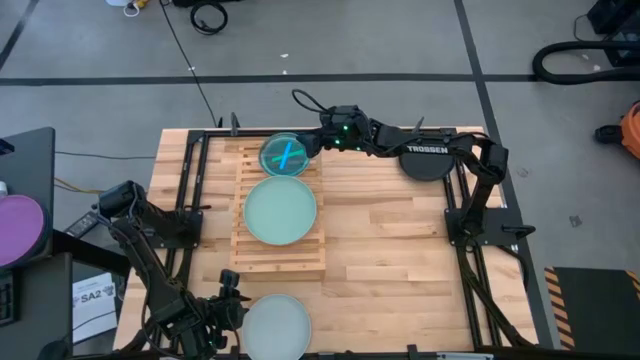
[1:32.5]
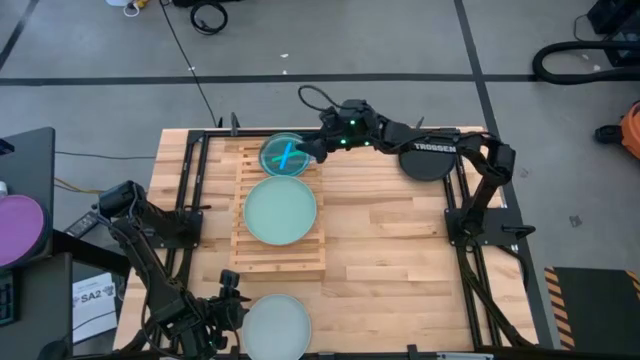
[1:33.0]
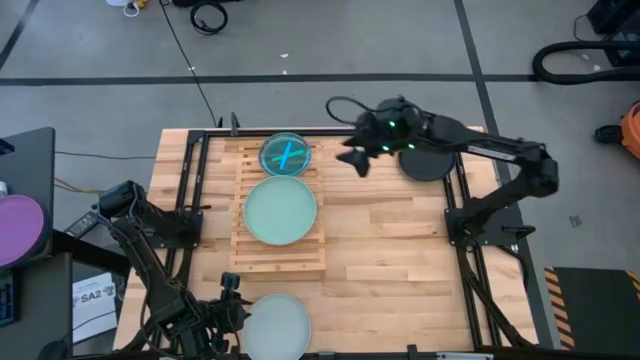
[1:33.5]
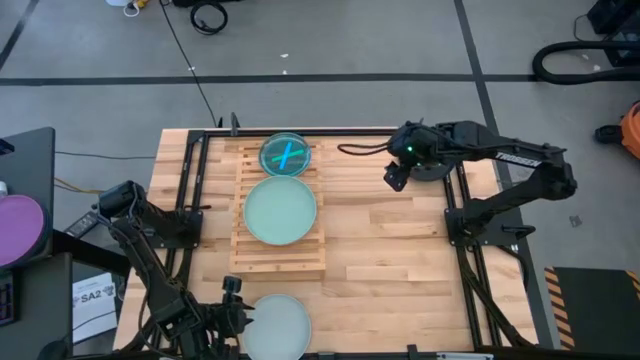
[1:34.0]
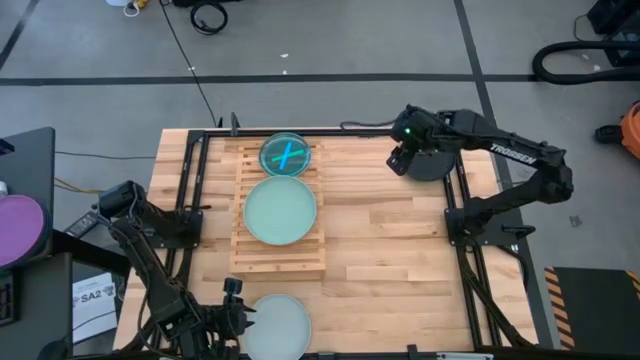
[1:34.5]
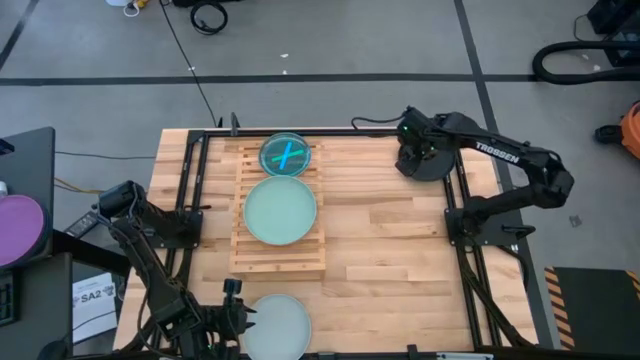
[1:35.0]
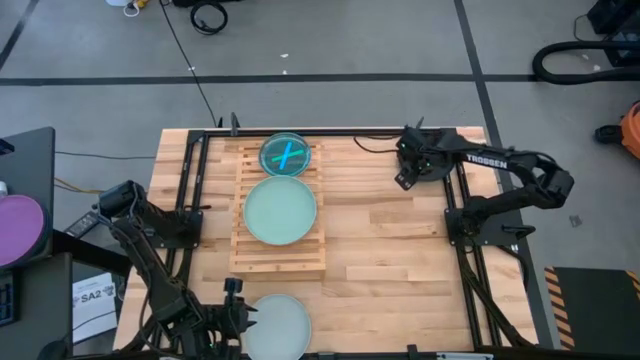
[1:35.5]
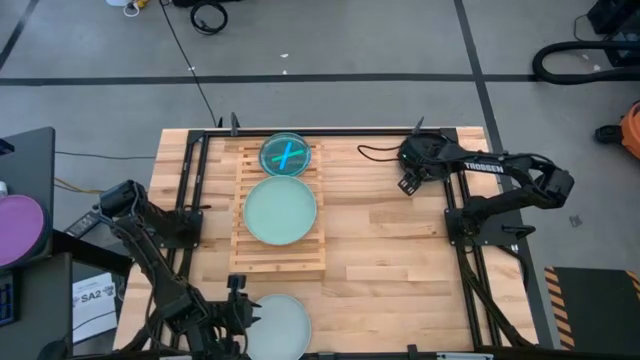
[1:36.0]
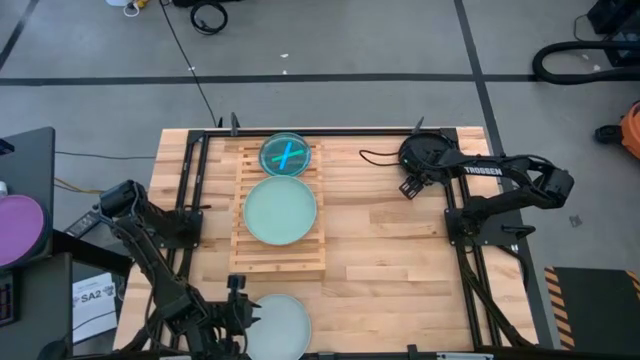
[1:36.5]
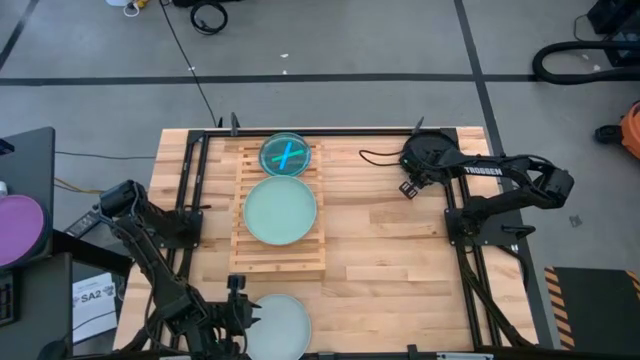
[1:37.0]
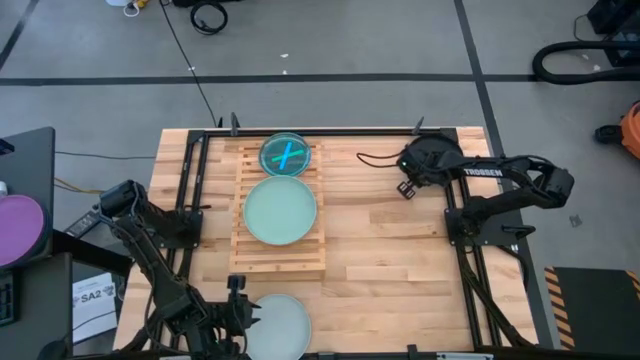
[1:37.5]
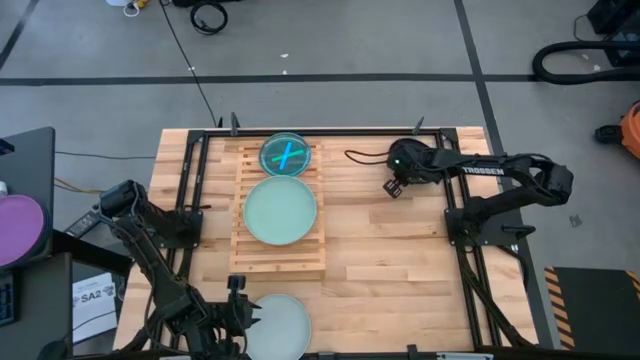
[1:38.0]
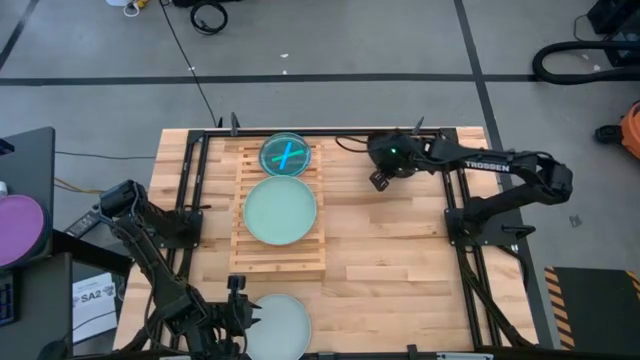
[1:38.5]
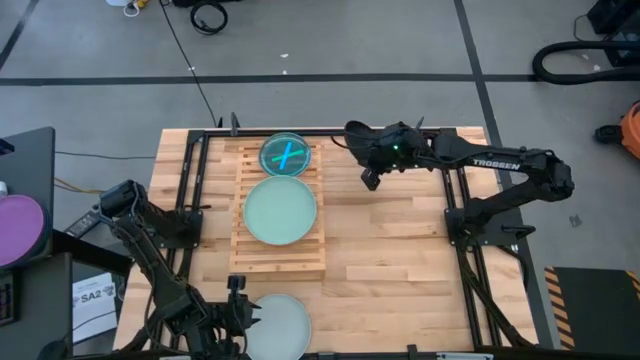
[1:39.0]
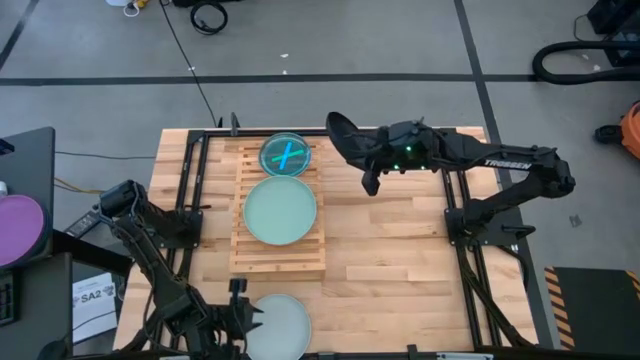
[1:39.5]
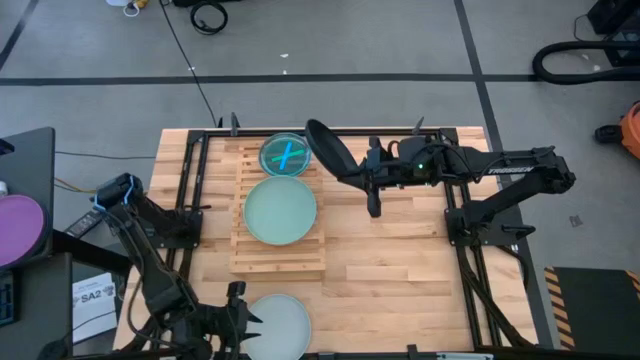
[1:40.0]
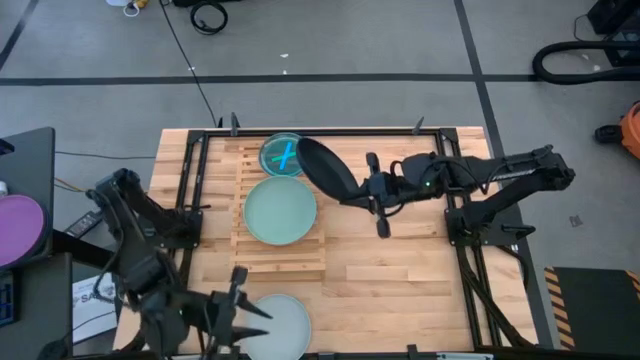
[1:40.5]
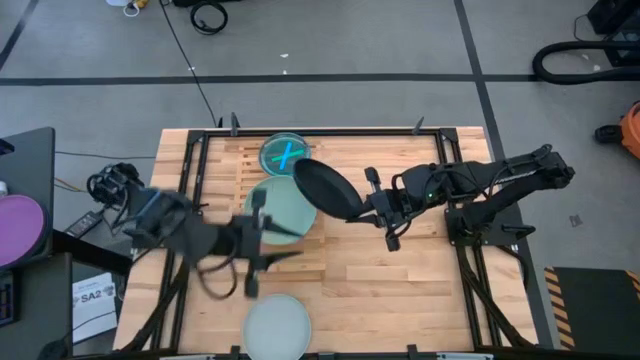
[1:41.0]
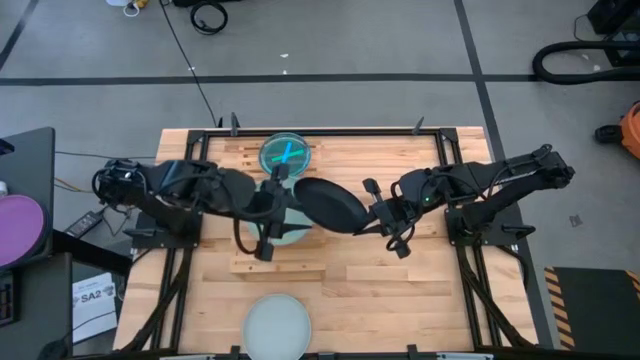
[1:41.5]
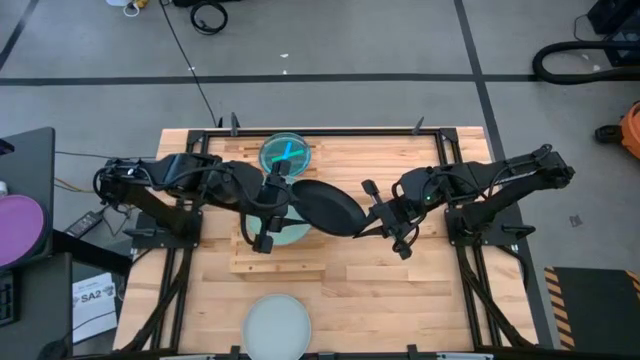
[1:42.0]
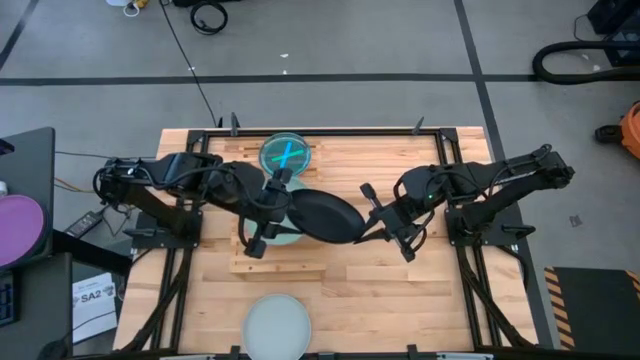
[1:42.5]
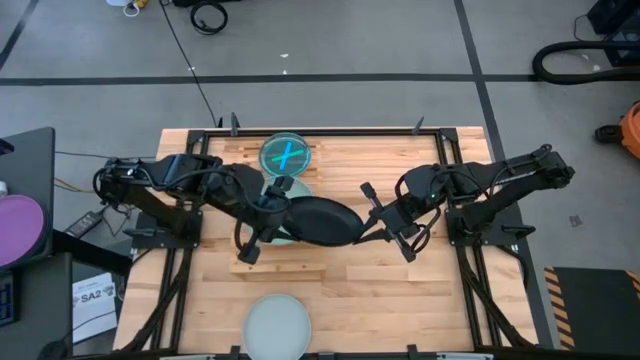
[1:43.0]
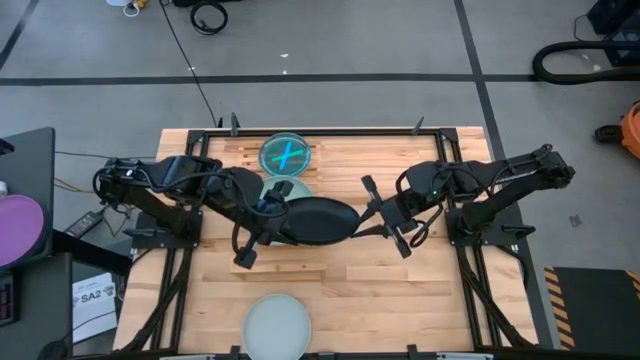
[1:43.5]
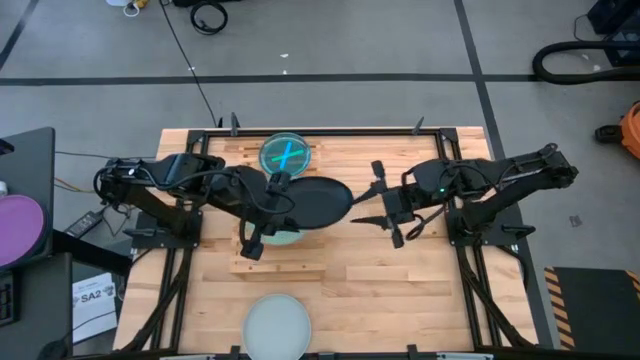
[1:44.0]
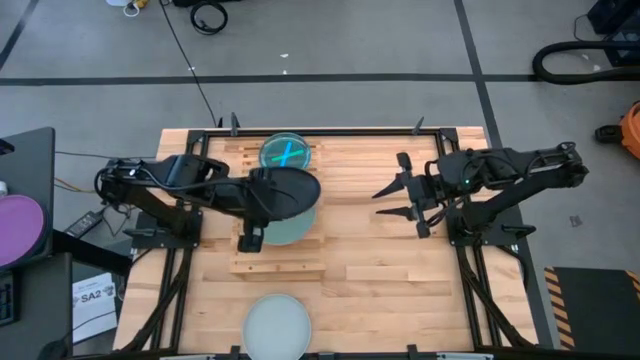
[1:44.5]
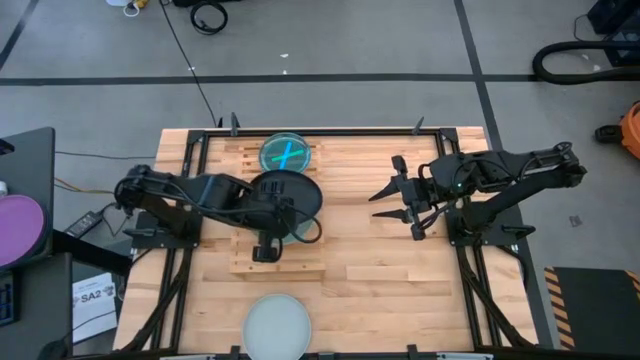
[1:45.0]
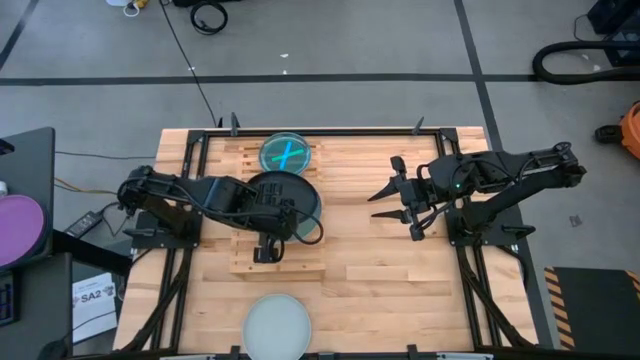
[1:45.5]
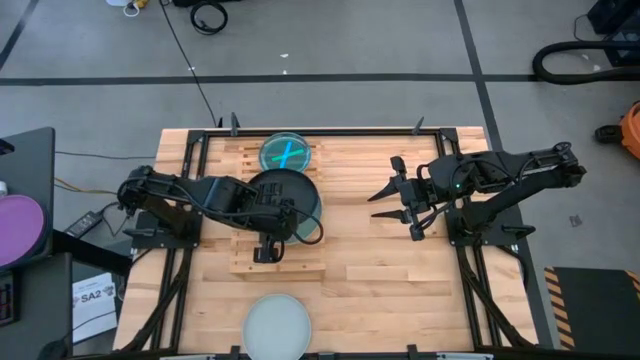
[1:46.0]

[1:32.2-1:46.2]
Task: Place and stack plates onto a shelf
Stack the black plate on the light green plate

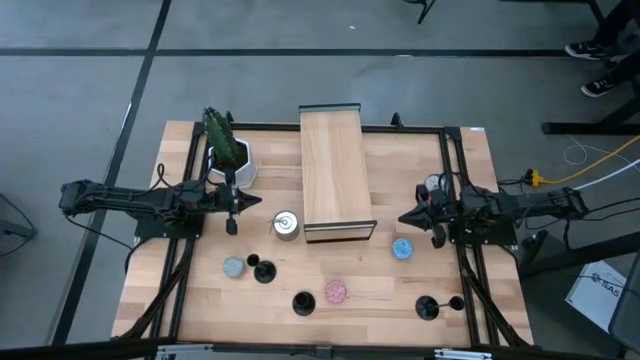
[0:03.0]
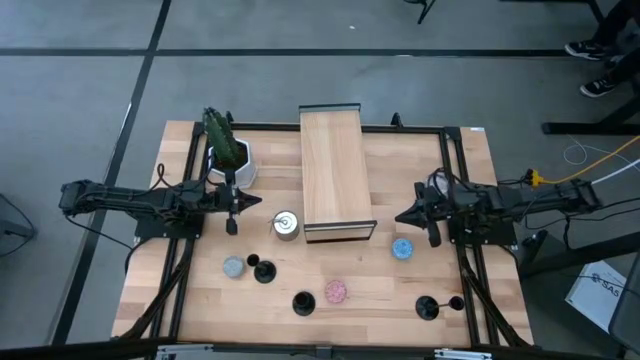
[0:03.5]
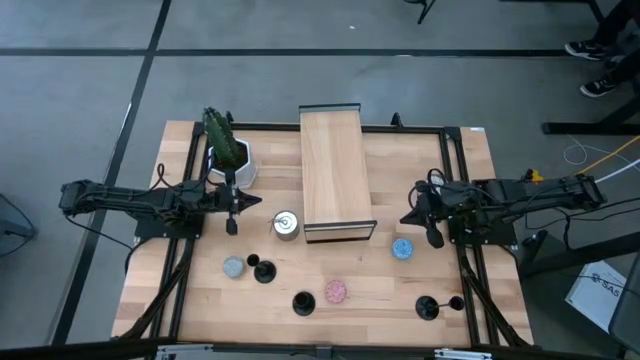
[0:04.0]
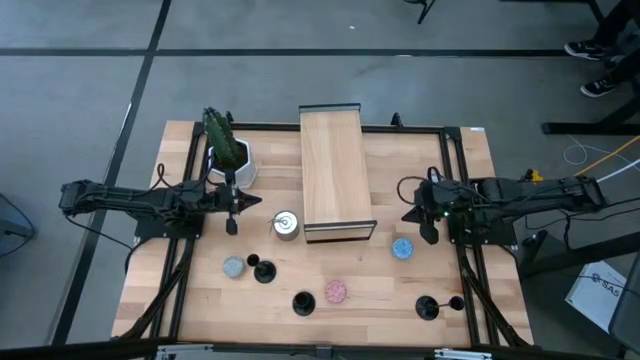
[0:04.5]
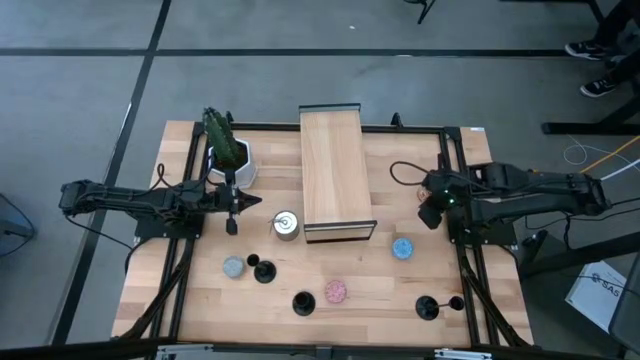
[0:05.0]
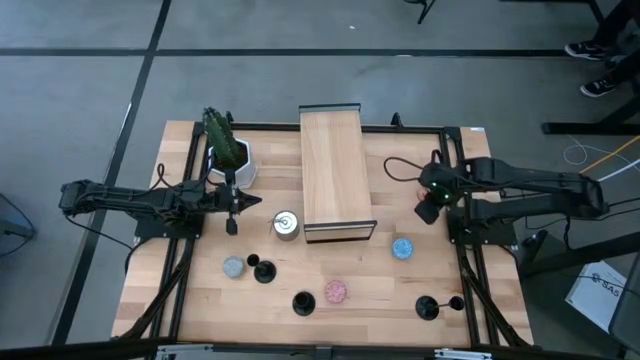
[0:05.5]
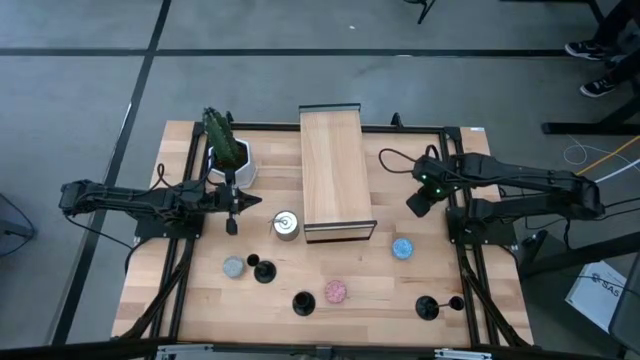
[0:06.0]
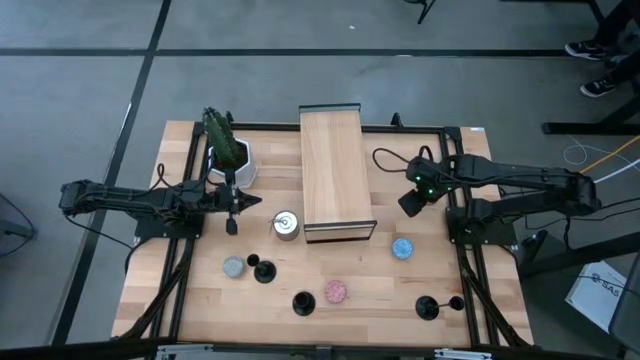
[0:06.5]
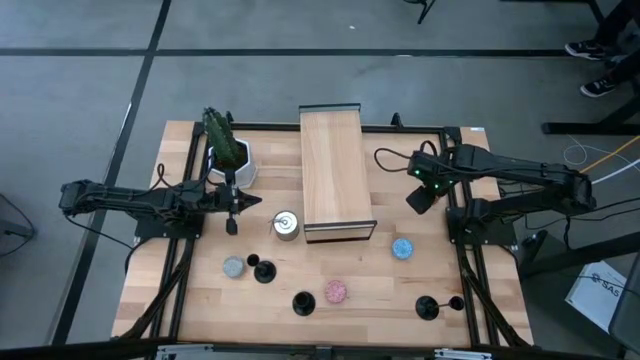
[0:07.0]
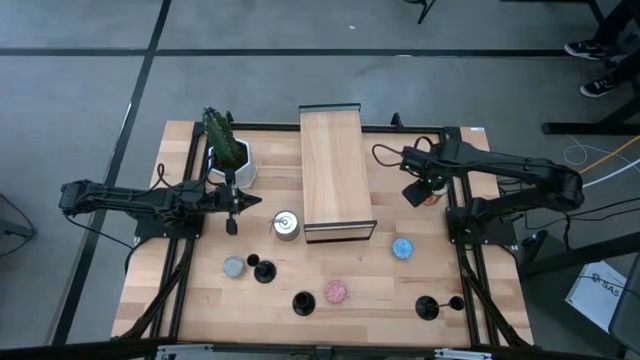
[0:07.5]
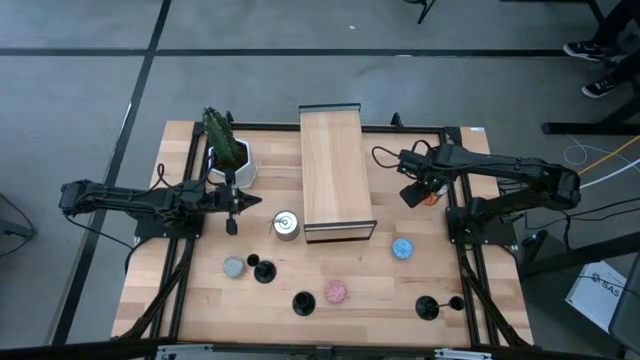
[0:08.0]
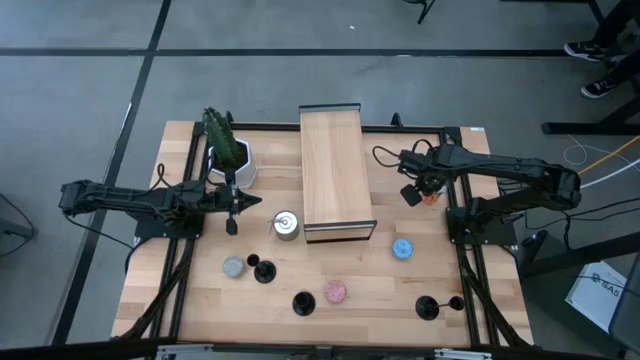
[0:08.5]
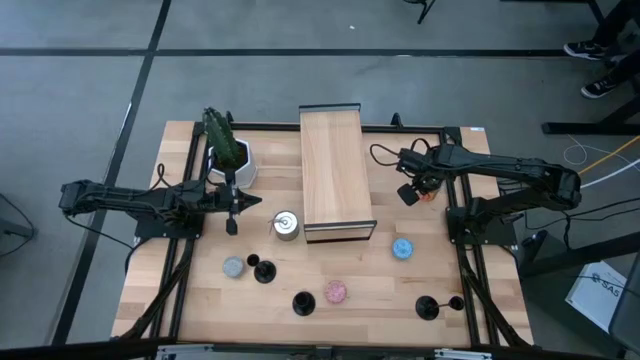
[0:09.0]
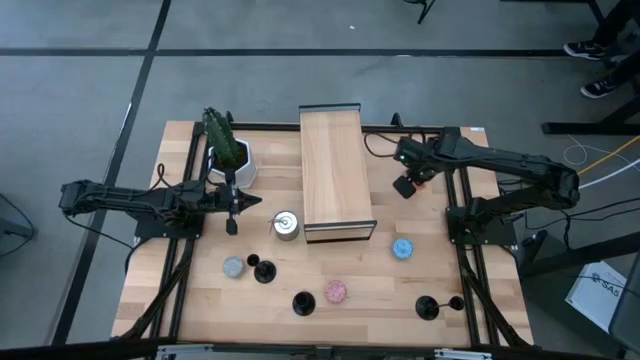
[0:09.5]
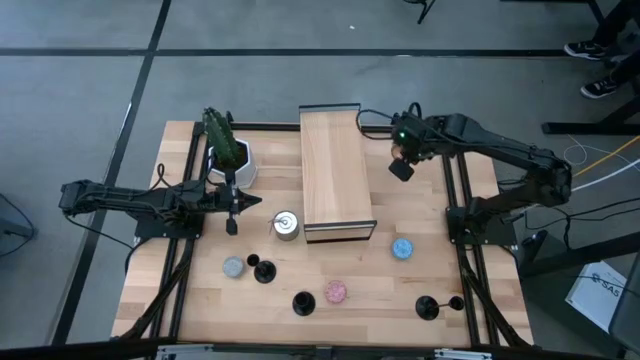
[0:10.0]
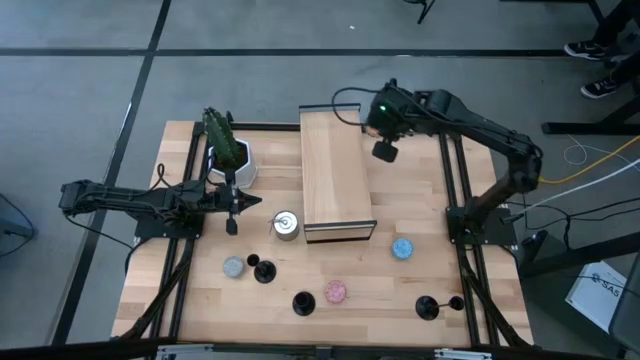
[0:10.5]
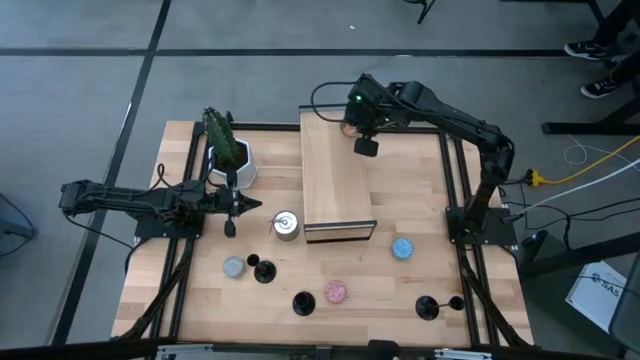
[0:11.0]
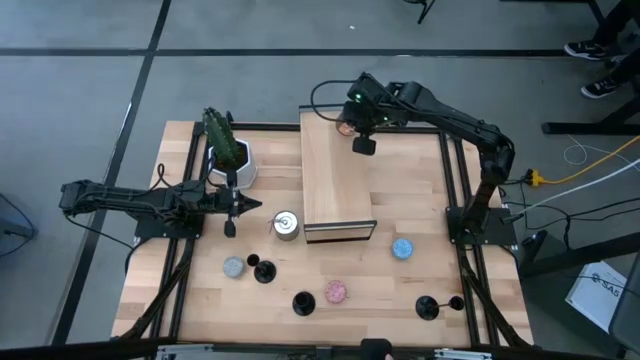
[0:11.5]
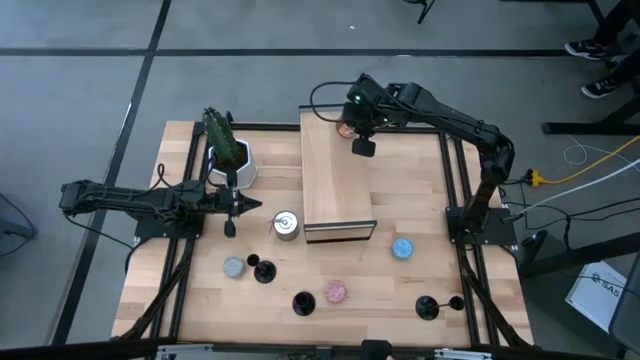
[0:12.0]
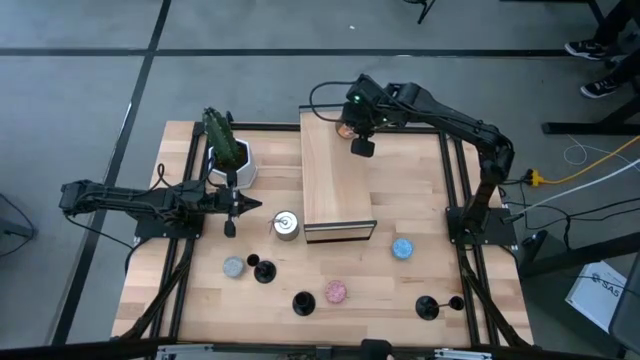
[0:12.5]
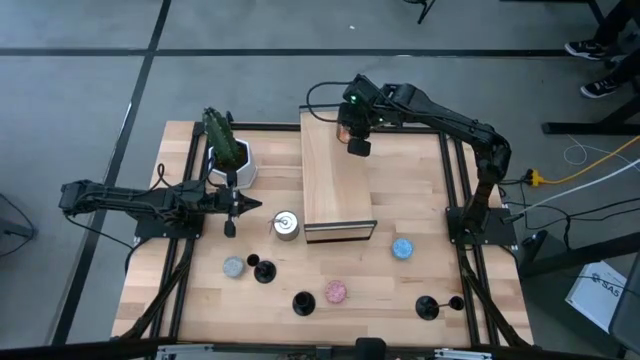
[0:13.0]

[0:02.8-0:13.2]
Task: Pick & Place candle stick holders
Put the large yellow scented candle on the shelf
